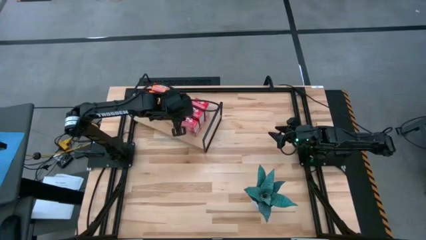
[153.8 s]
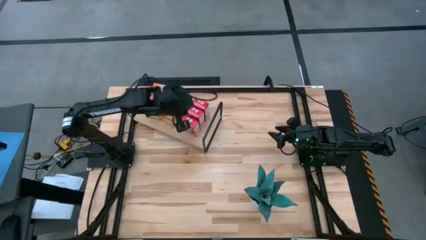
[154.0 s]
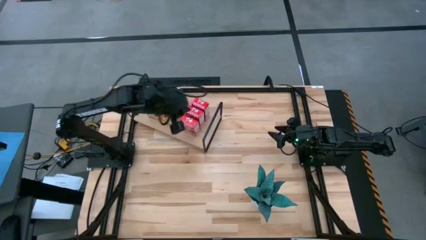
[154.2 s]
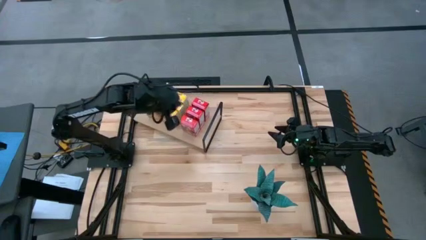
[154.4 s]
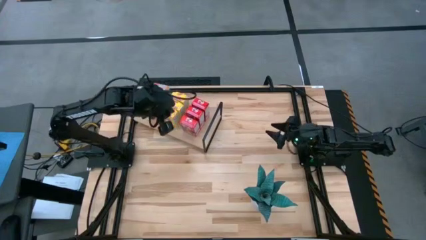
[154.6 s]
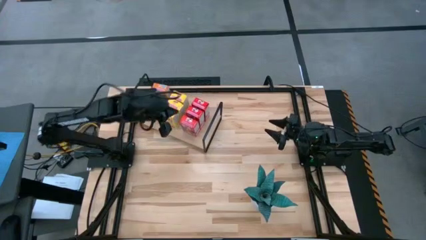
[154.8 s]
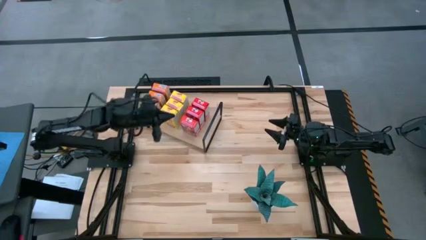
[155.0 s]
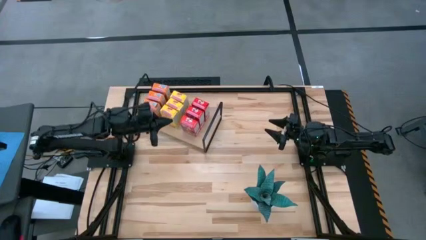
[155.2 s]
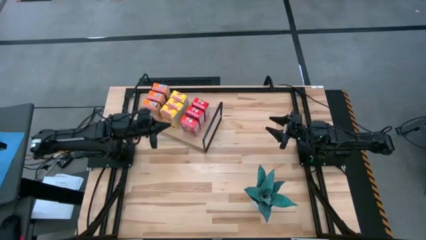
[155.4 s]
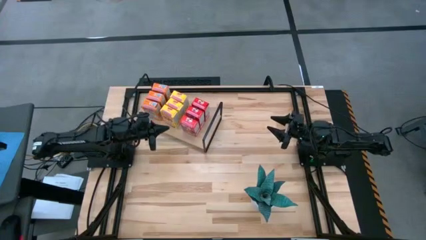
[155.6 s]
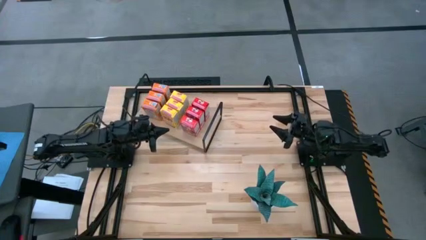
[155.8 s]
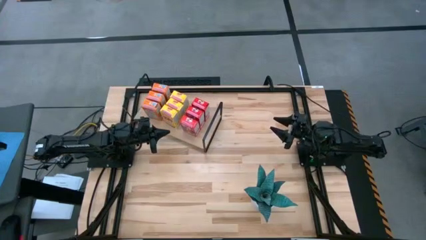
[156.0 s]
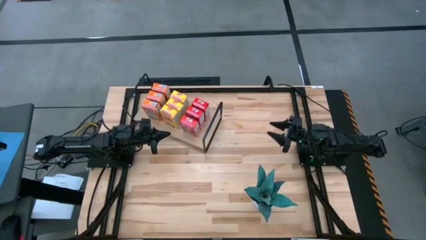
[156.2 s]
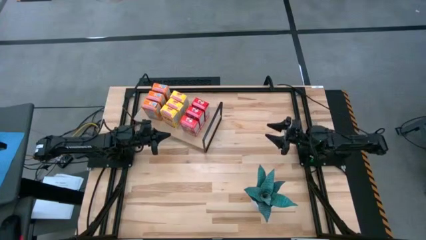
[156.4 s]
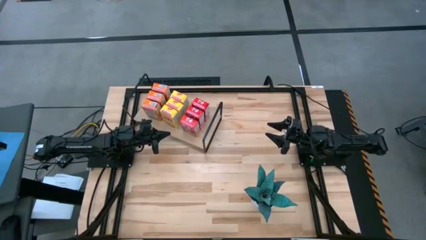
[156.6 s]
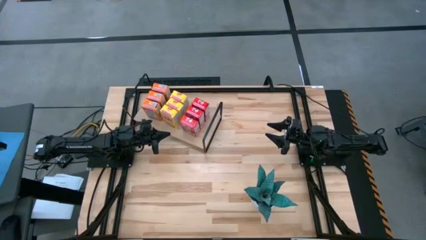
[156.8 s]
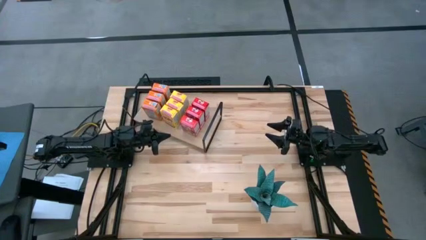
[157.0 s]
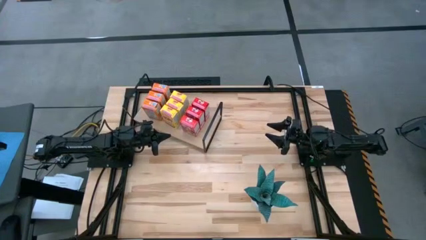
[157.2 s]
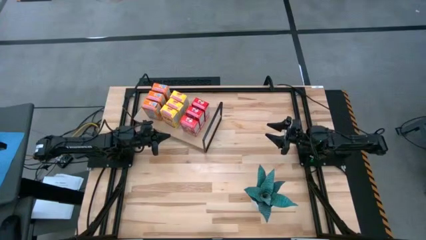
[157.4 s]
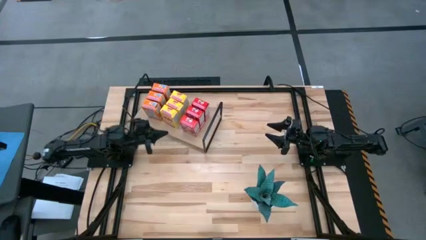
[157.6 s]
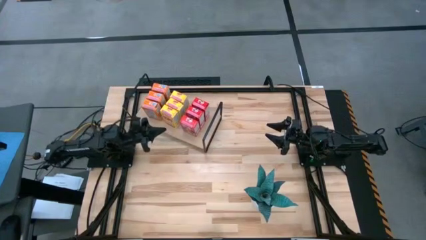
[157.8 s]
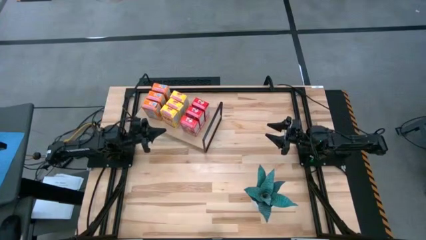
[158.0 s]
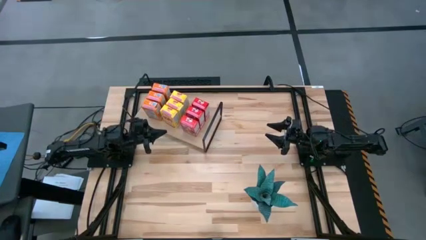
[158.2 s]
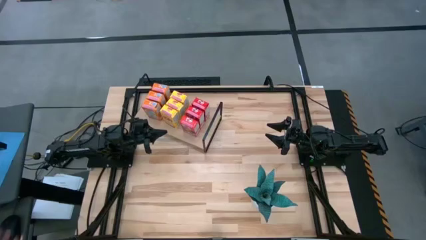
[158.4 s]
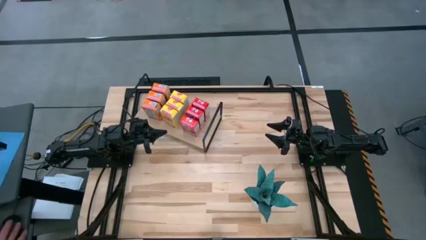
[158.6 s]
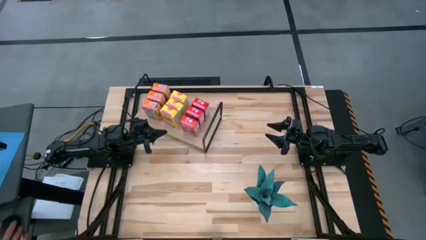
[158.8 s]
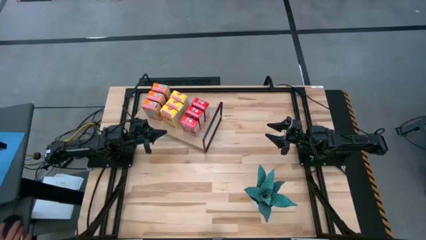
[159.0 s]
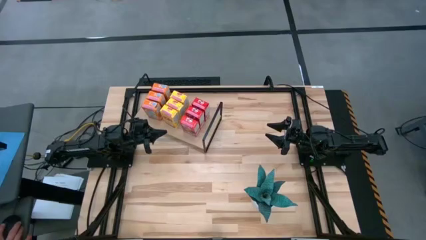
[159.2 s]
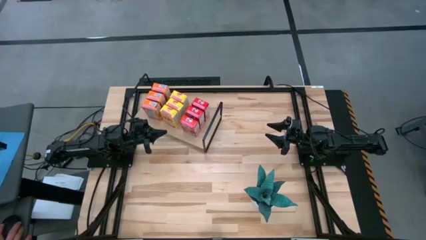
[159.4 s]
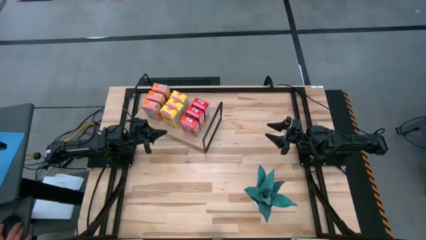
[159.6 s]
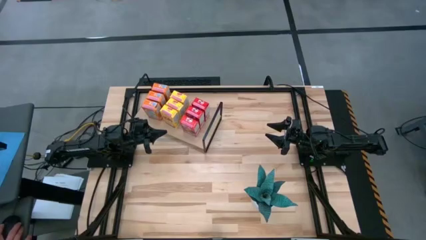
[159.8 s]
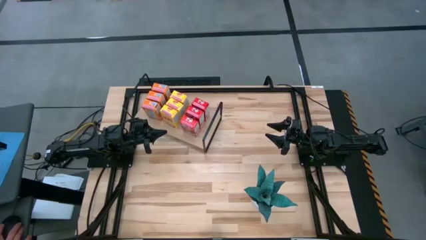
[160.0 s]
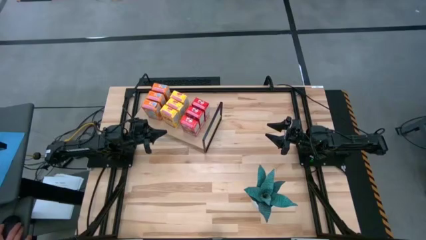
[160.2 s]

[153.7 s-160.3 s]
Task: Stack cereal on shelf
Return to Home Position

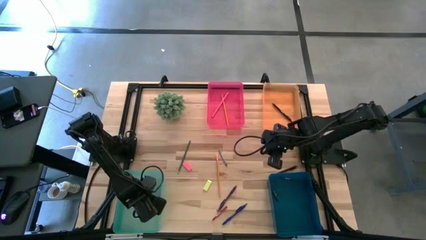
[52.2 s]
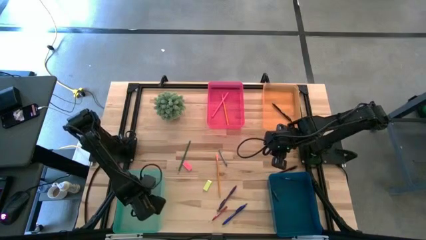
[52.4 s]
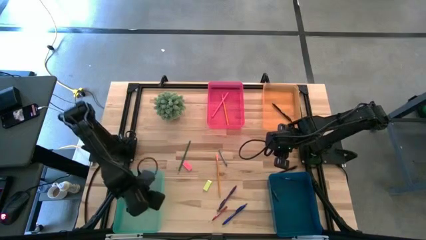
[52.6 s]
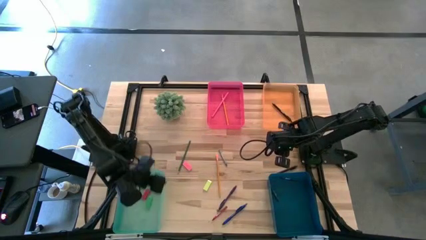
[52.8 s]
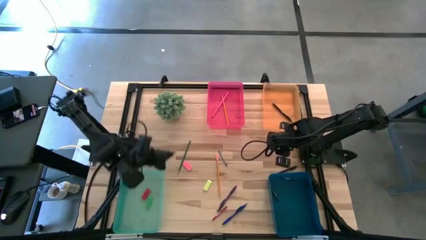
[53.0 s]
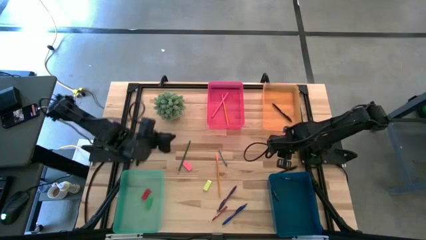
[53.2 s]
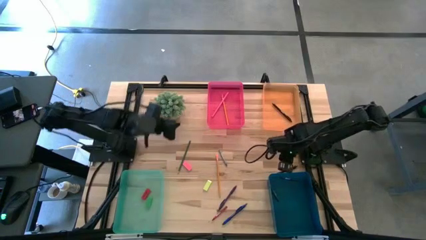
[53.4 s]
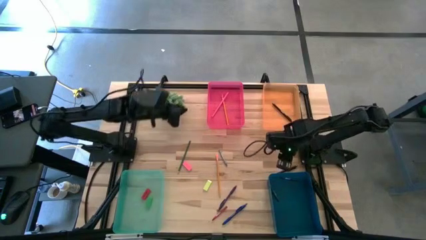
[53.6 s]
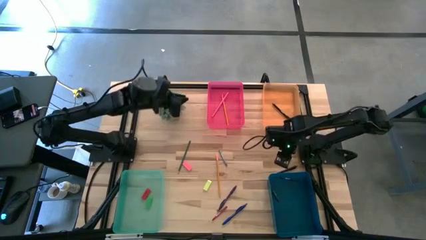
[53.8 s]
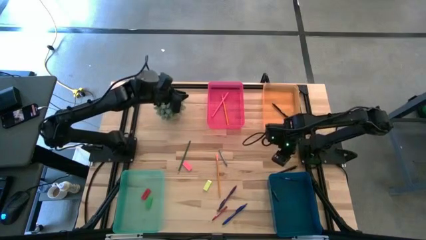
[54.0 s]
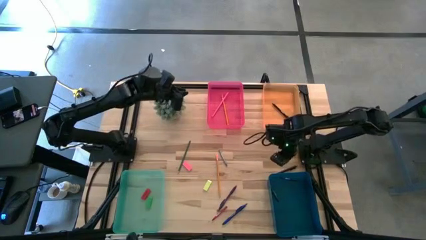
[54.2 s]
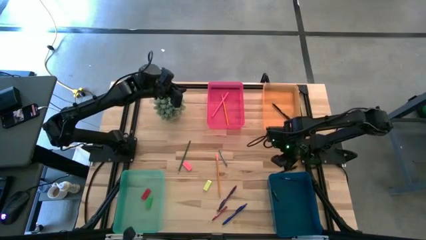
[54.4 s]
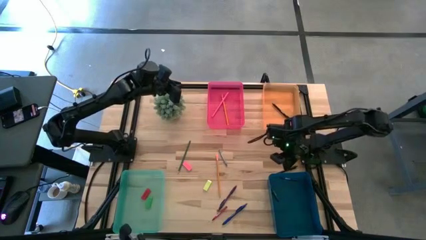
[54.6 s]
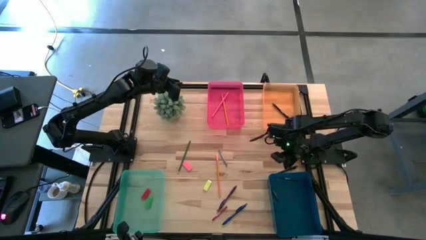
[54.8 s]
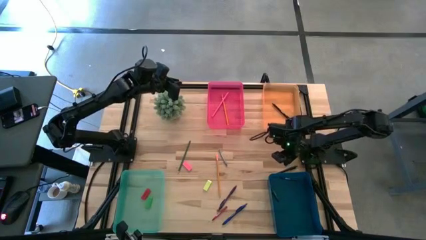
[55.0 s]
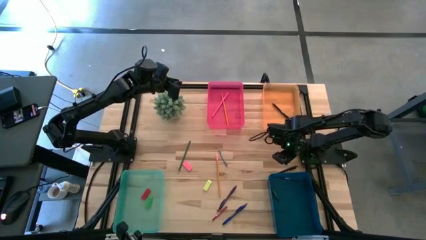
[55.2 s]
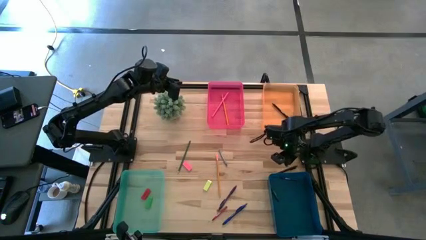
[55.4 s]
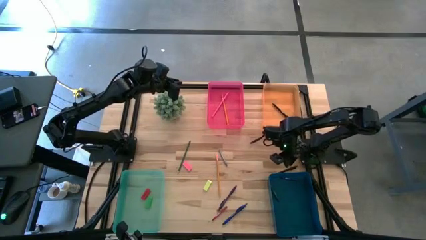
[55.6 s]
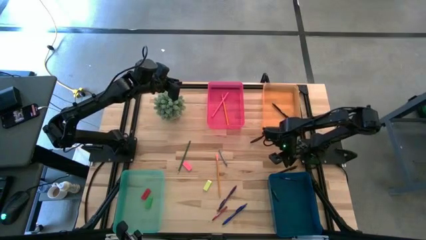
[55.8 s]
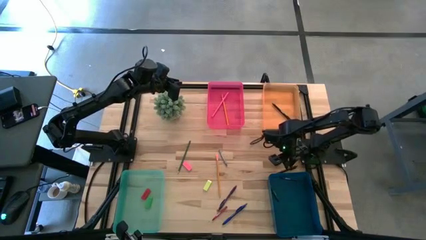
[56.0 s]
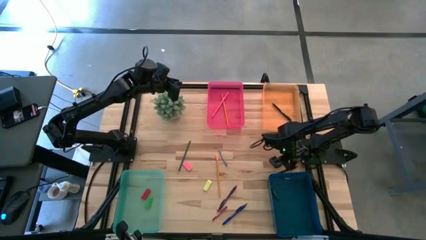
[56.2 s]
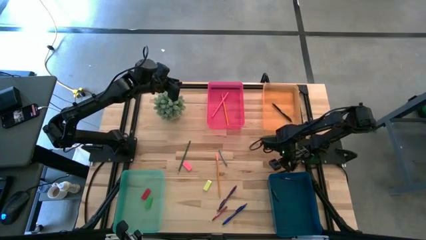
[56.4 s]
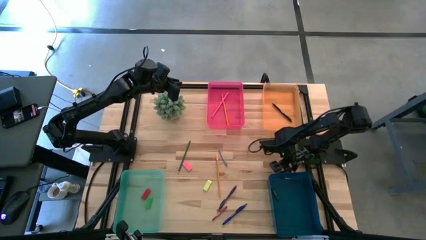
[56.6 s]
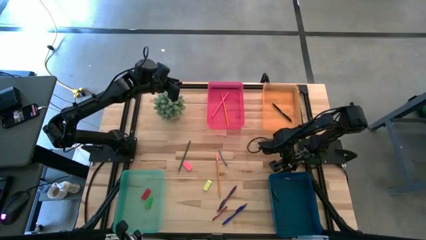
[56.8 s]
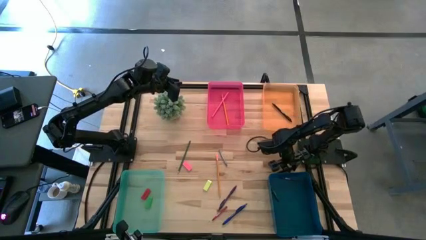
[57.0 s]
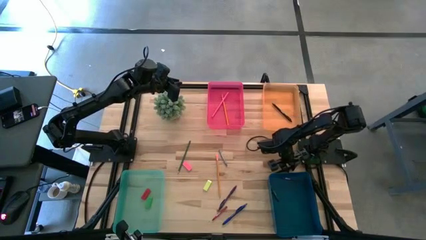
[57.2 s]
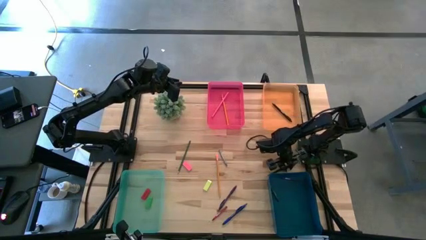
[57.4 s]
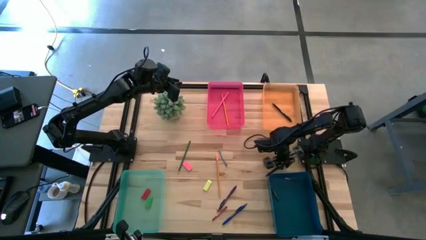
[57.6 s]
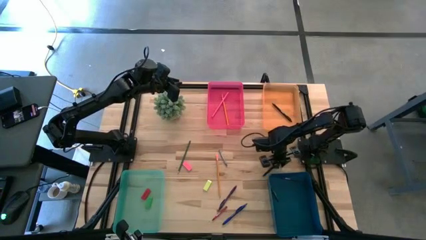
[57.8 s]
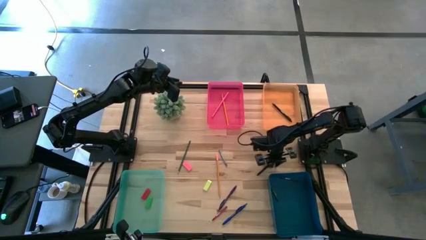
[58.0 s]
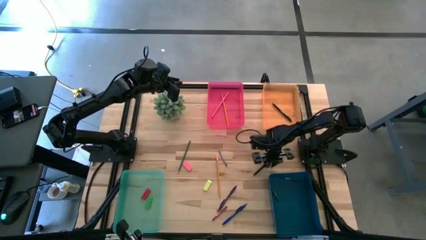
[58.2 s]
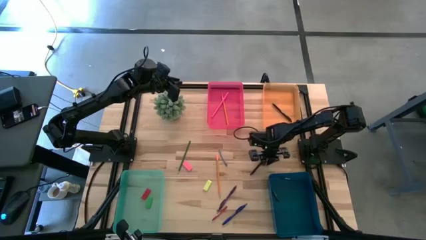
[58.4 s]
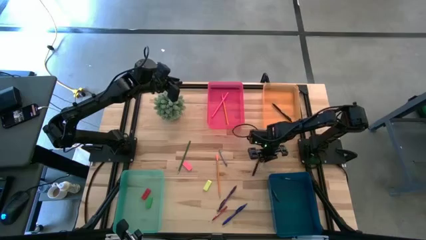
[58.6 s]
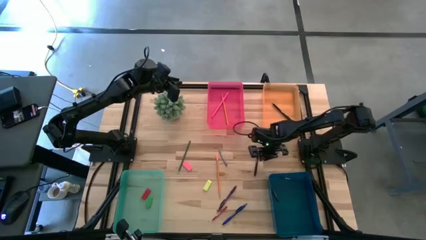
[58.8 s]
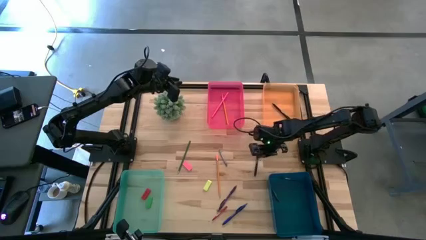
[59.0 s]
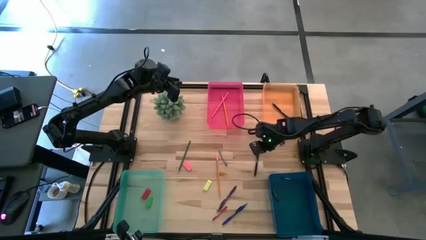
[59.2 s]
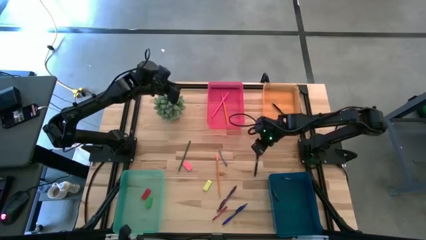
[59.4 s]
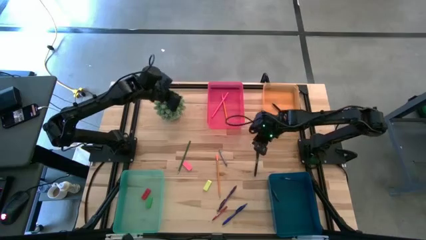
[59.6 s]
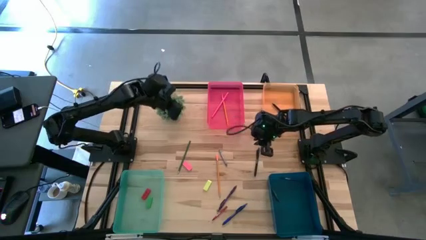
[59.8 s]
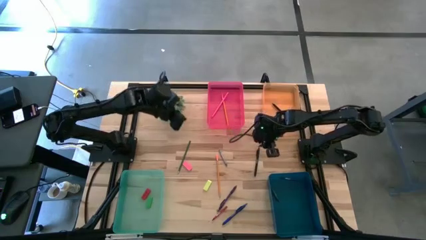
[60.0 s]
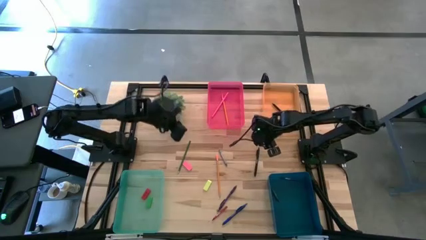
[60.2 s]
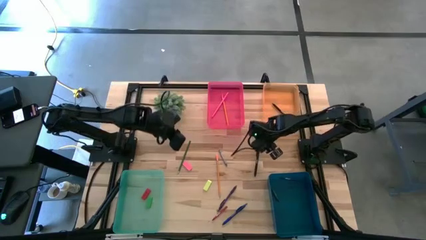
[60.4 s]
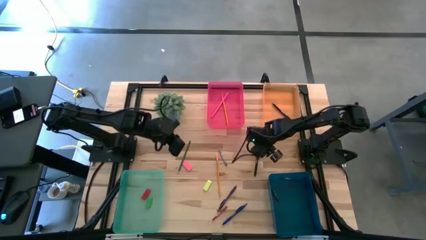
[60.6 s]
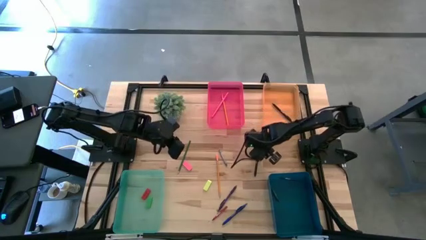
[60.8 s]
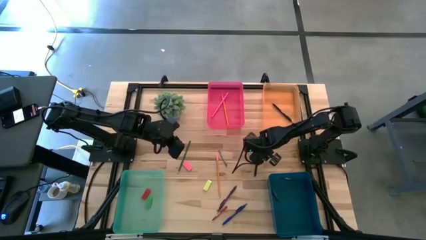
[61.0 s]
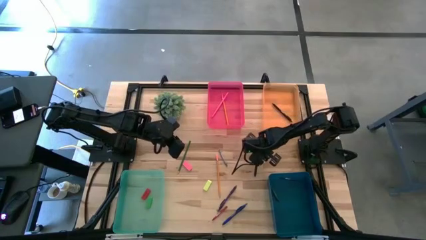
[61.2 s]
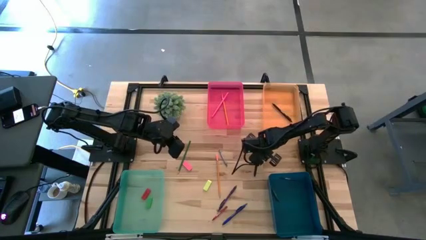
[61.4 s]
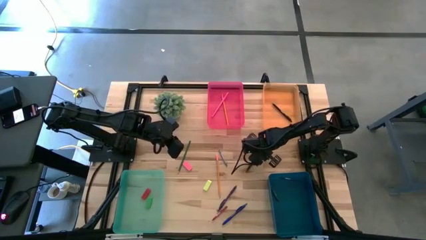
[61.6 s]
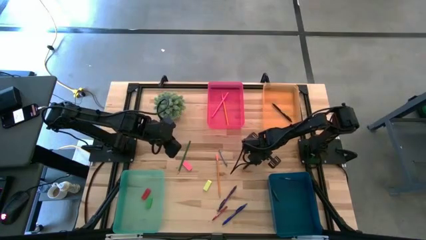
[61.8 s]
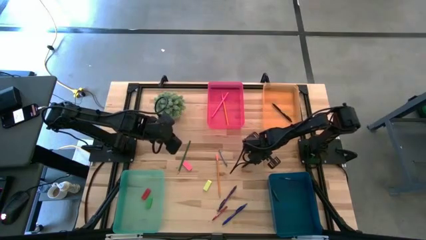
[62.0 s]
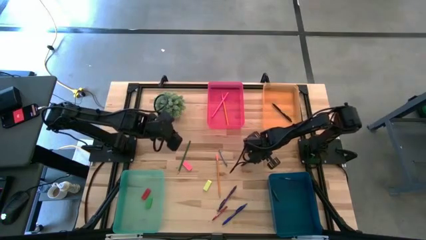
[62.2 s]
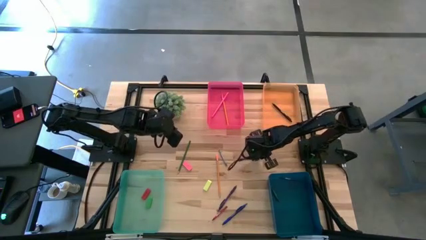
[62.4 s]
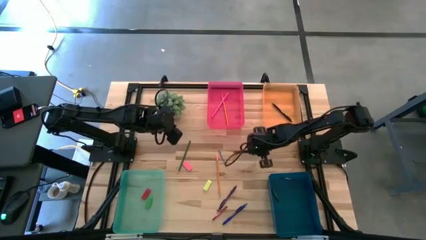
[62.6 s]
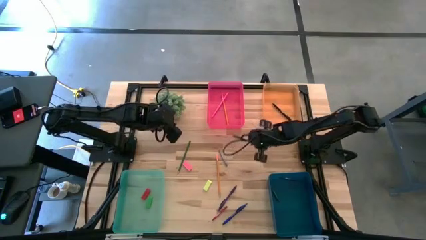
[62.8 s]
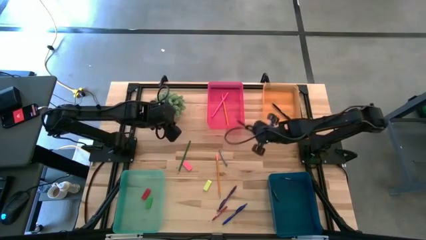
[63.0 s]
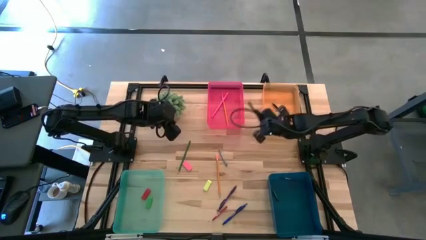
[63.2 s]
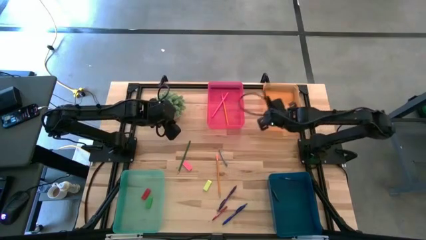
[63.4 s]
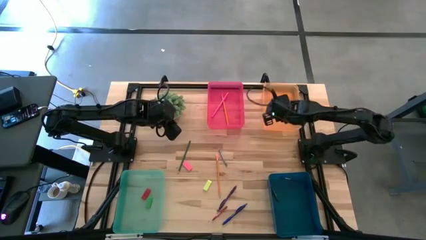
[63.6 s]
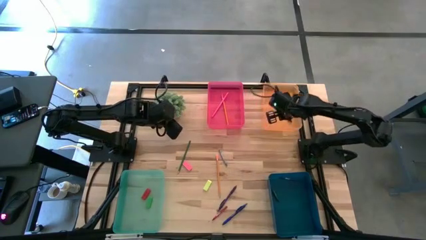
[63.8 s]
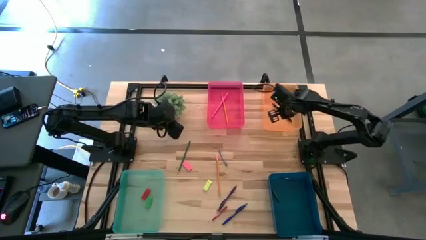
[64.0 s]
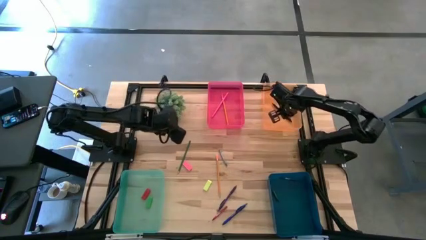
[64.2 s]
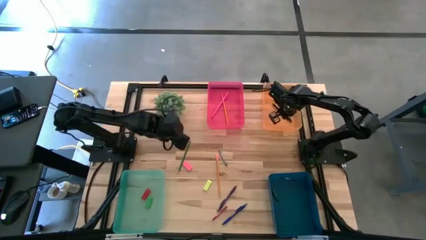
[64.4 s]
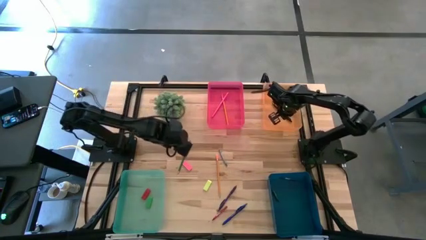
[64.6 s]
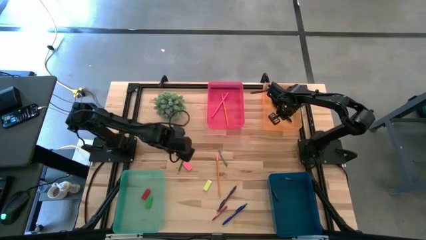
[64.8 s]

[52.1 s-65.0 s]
Task: Sort crayons/erasers/pens/pencils in bins
Put the black pen into the orange bin
